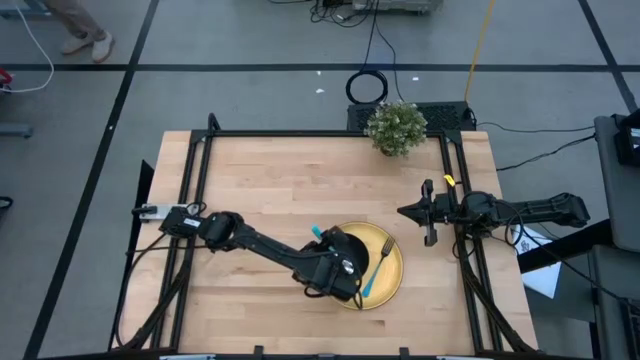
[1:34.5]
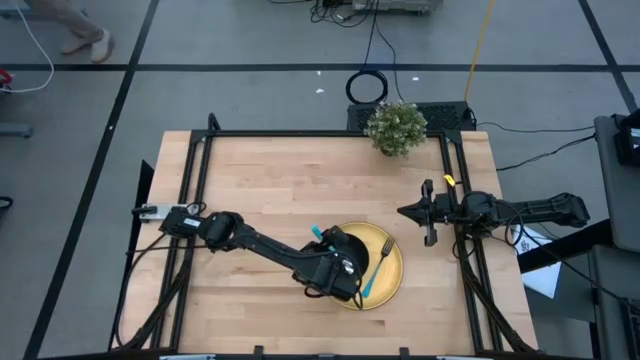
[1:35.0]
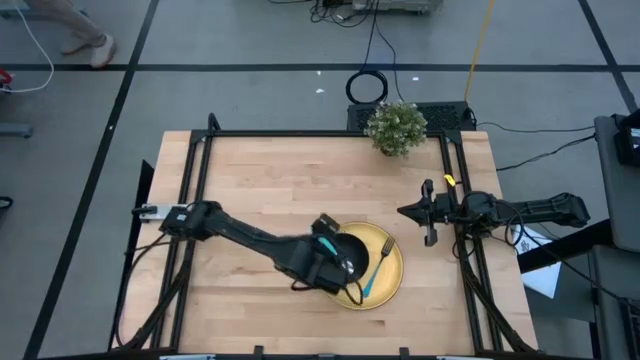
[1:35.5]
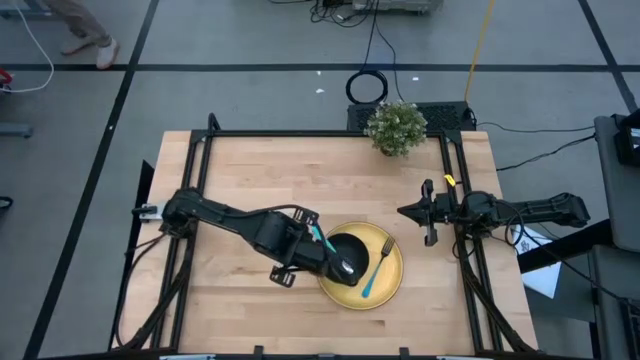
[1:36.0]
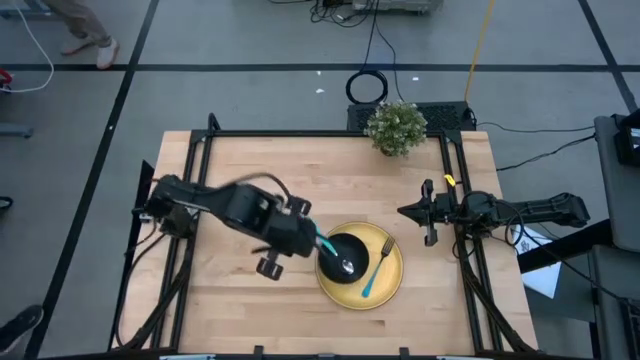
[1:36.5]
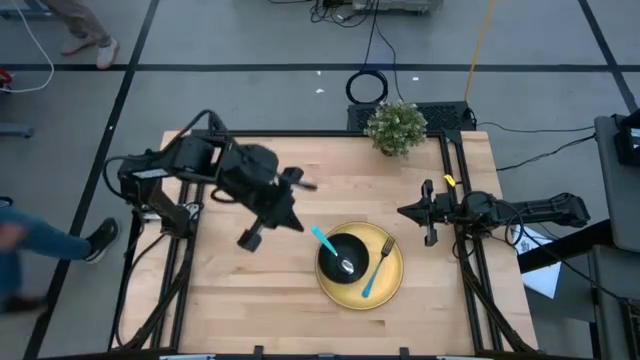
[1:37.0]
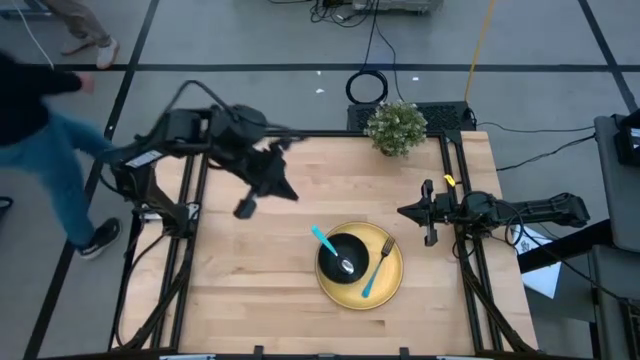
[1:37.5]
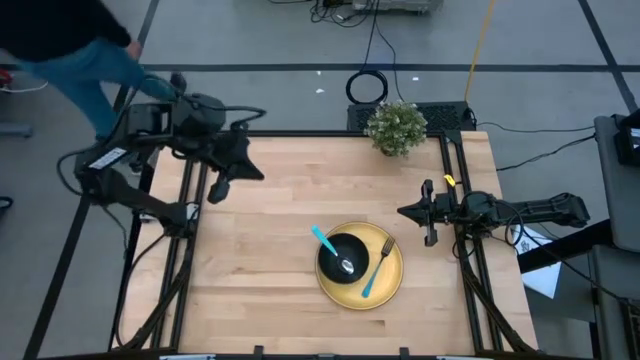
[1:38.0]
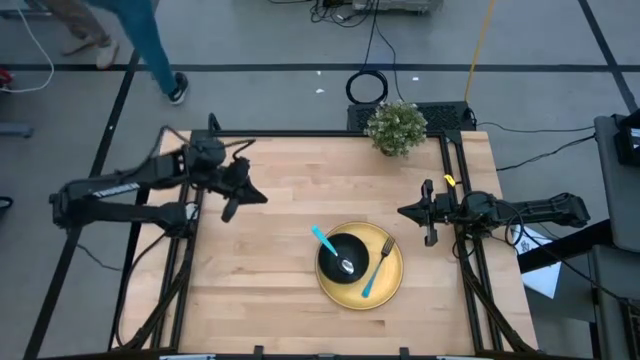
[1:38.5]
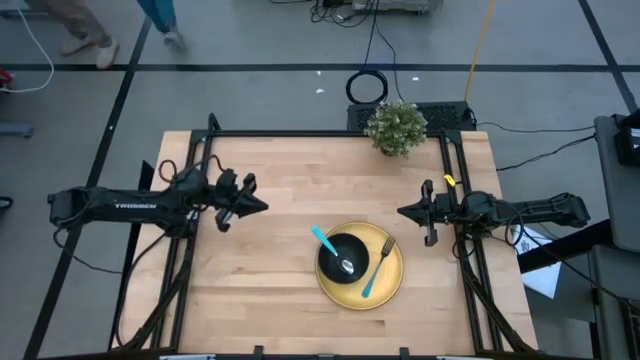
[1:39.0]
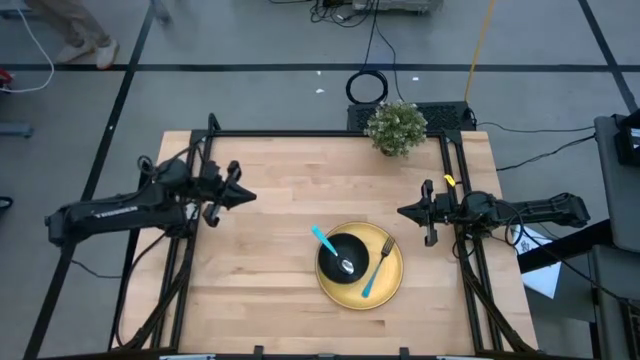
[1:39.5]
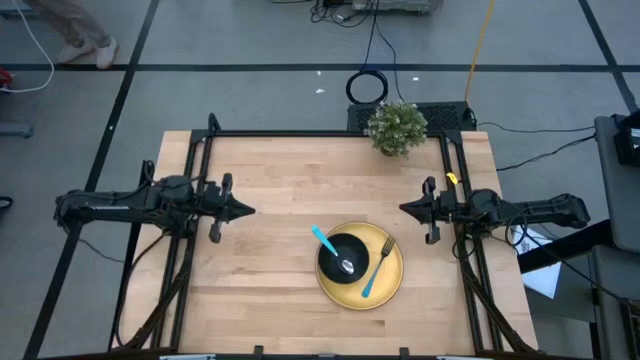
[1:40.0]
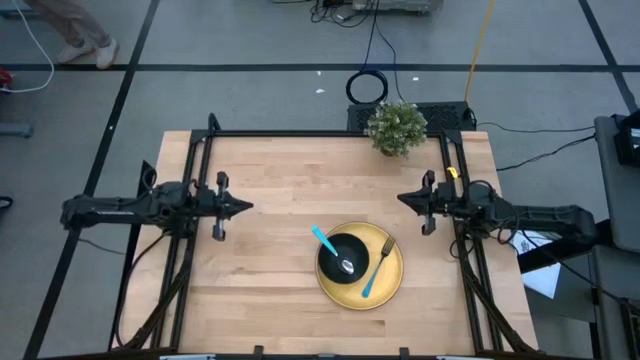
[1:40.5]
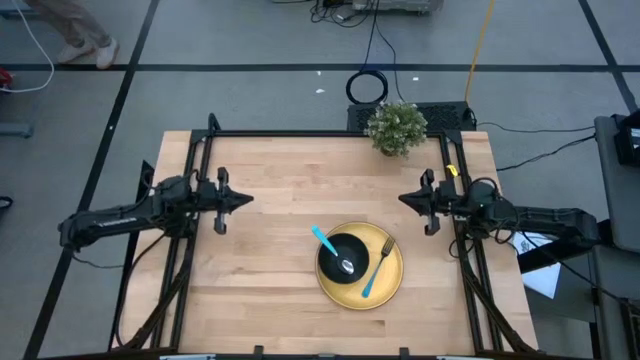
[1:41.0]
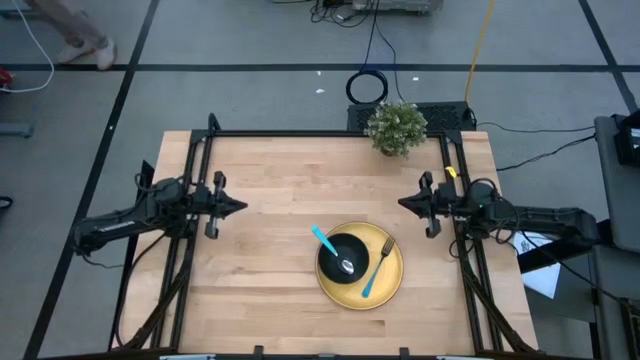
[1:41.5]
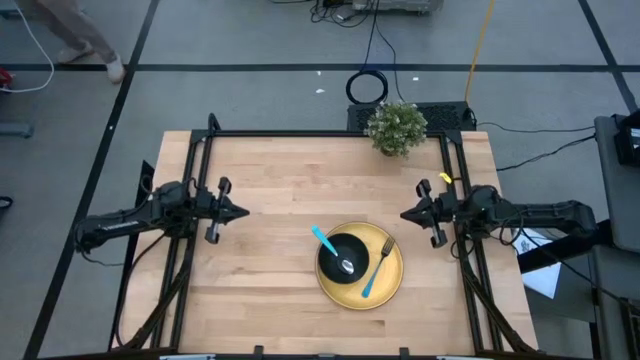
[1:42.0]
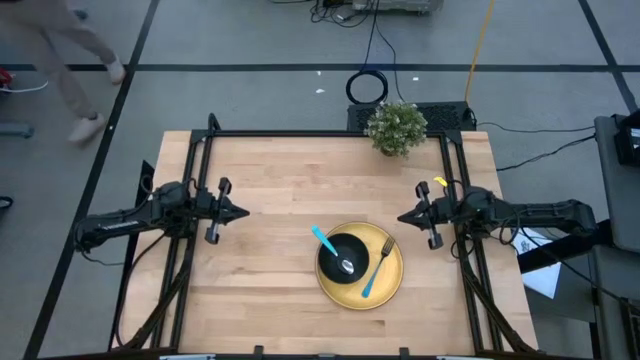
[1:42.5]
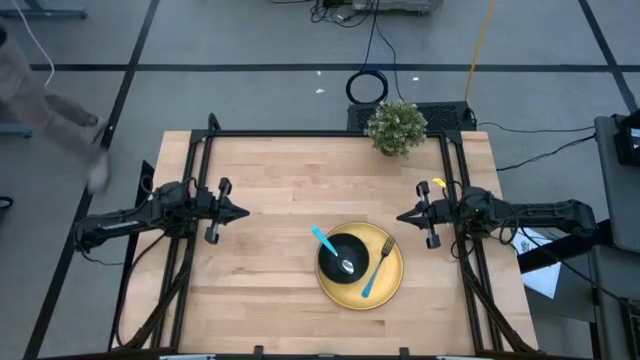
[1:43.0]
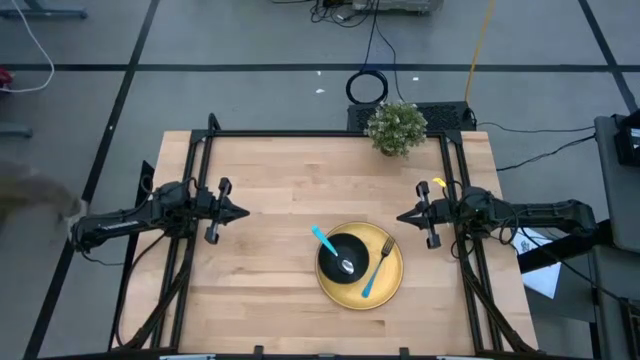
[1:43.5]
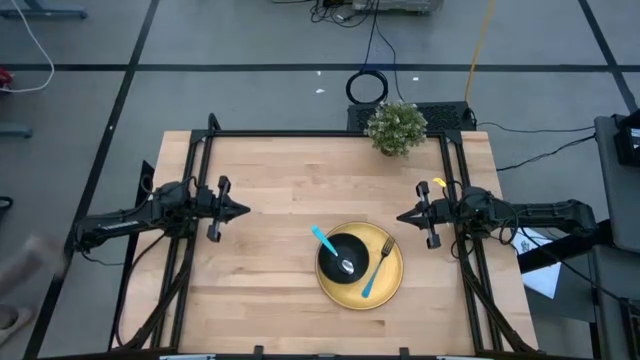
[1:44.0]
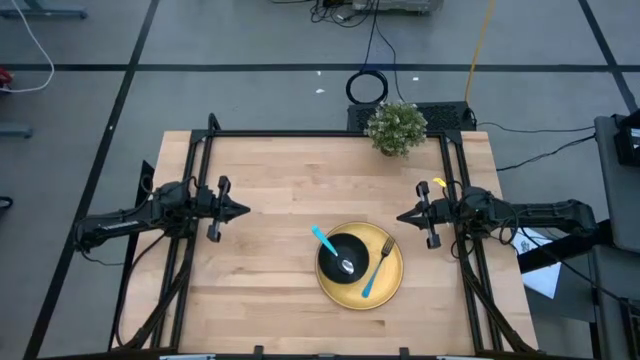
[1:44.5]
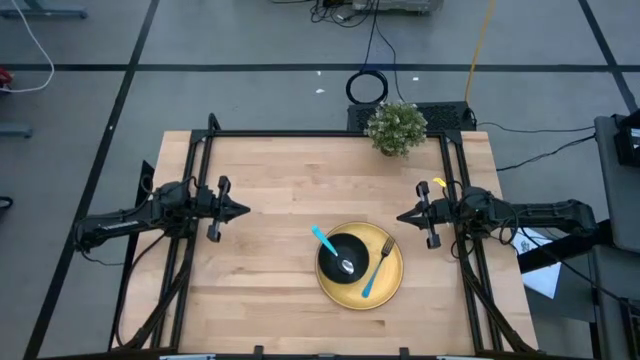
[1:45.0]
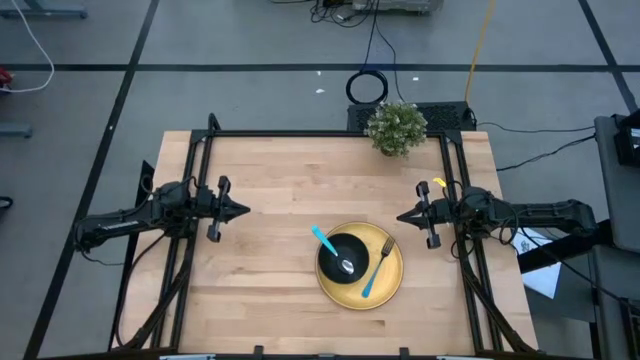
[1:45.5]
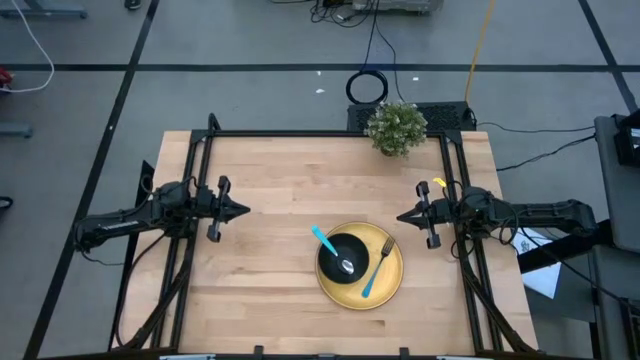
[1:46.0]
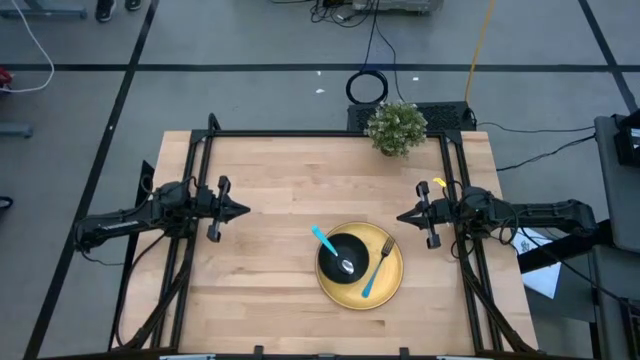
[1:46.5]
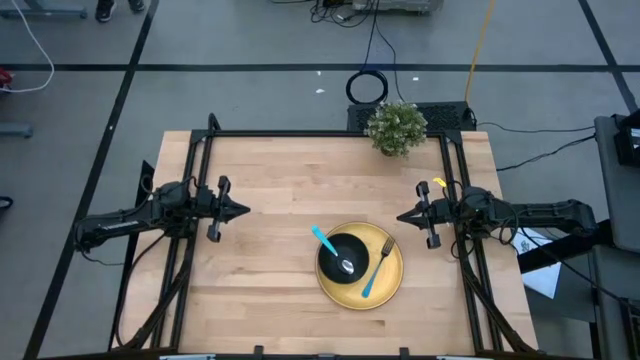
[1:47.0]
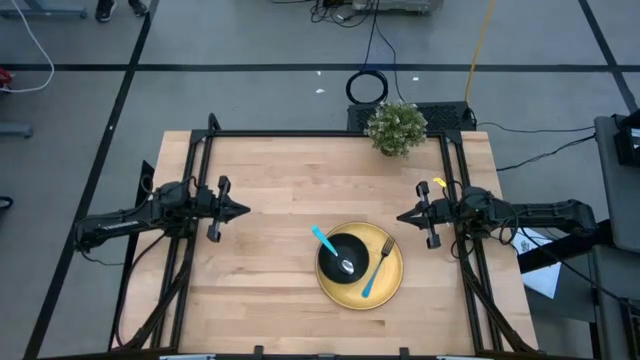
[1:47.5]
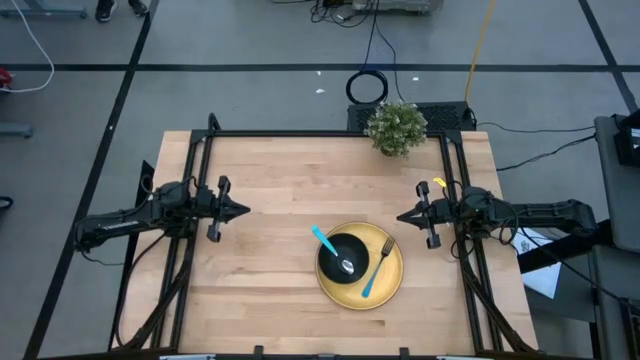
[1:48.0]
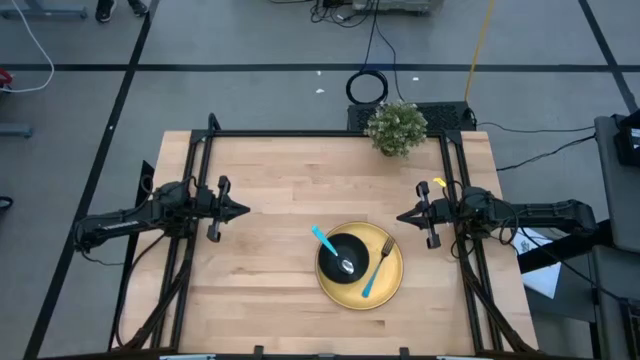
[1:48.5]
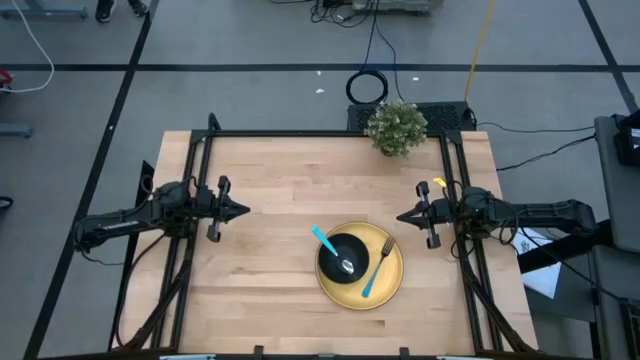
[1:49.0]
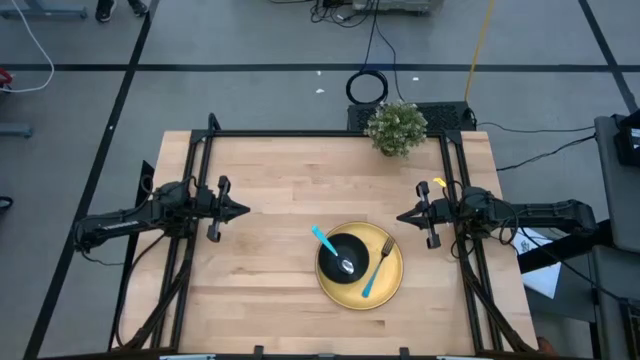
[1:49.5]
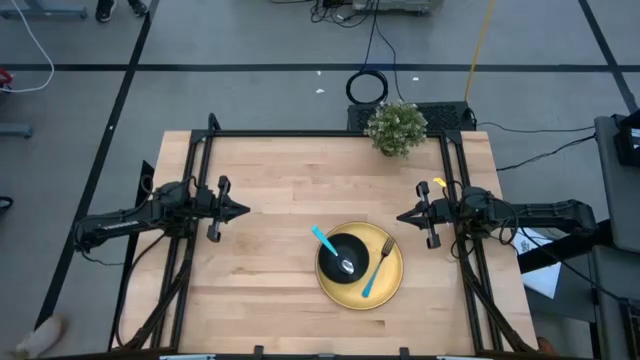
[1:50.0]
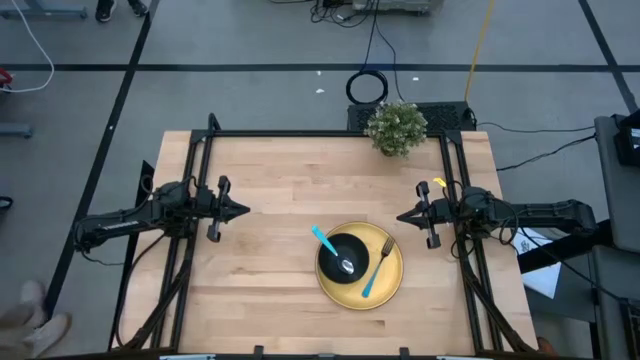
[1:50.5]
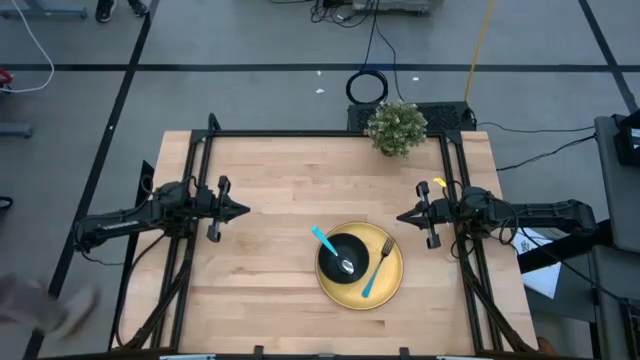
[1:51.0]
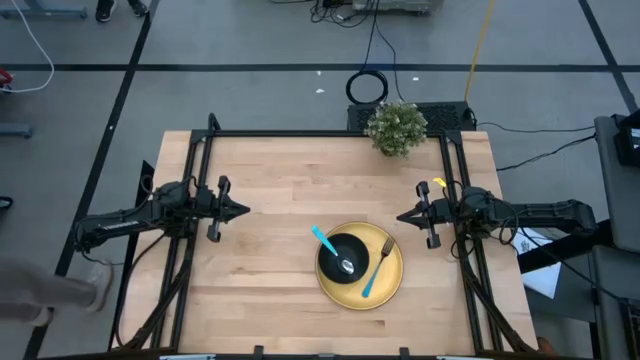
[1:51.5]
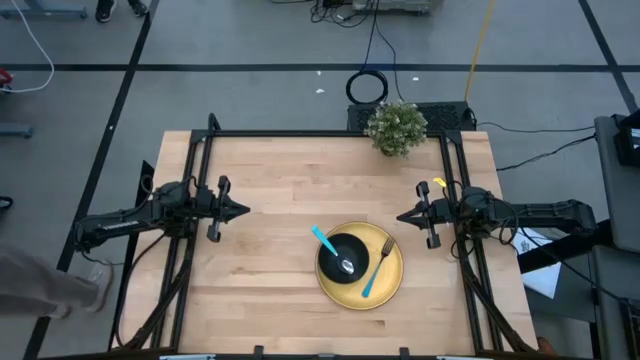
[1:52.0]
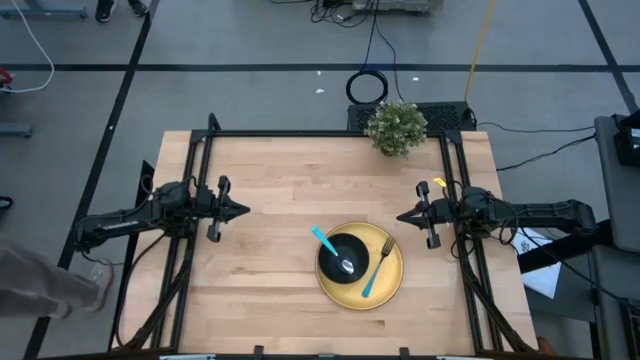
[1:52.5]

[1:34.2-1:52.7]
Task: Set table place
Return to Home Position

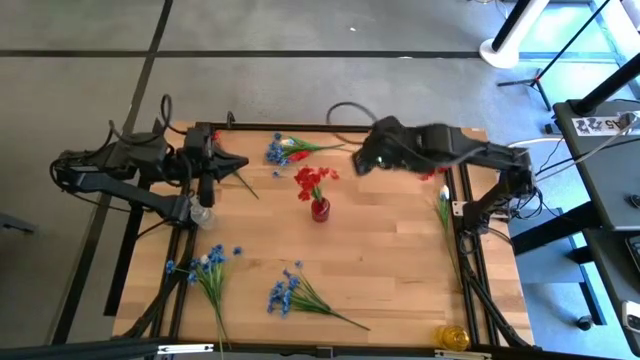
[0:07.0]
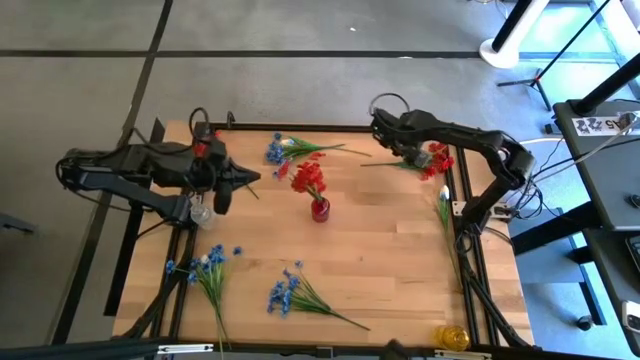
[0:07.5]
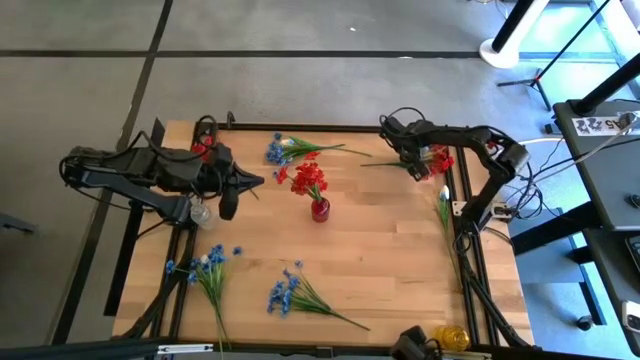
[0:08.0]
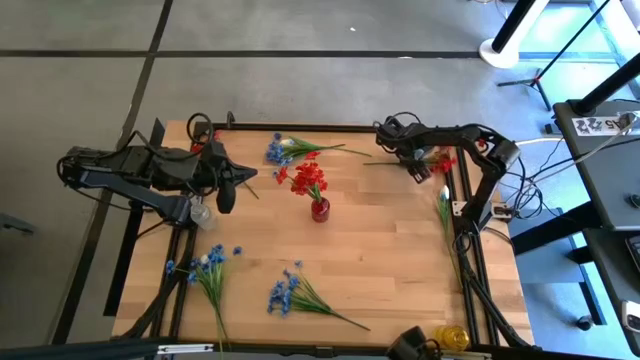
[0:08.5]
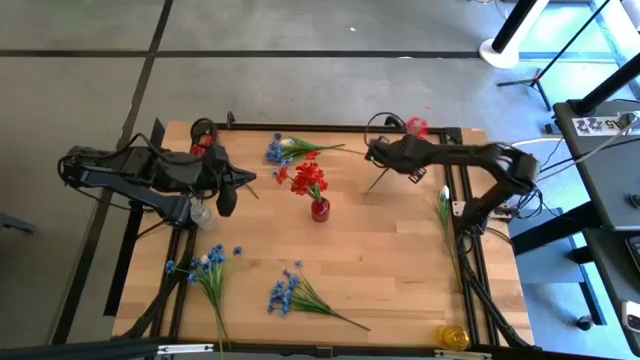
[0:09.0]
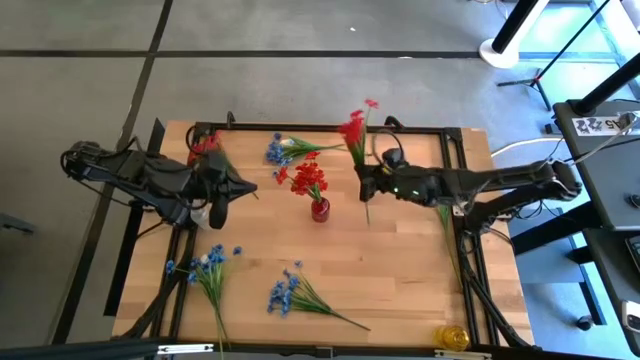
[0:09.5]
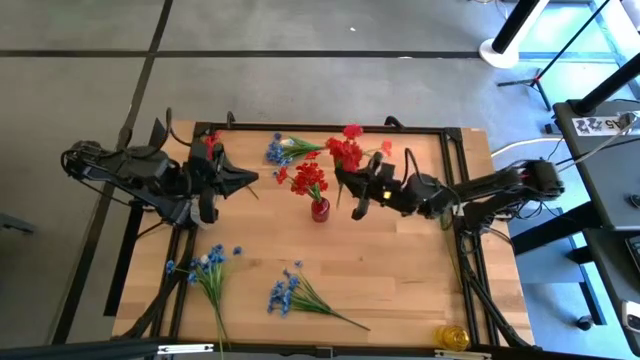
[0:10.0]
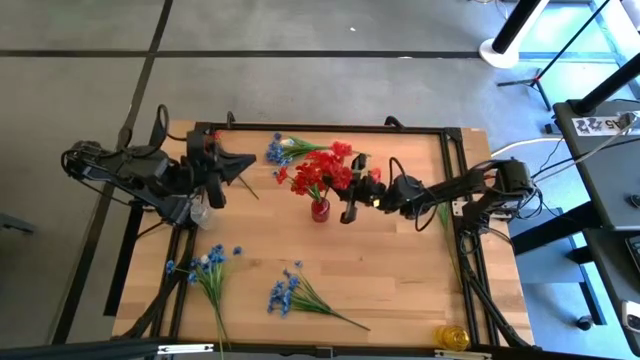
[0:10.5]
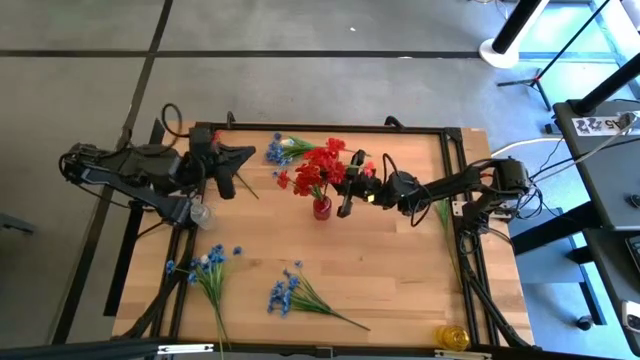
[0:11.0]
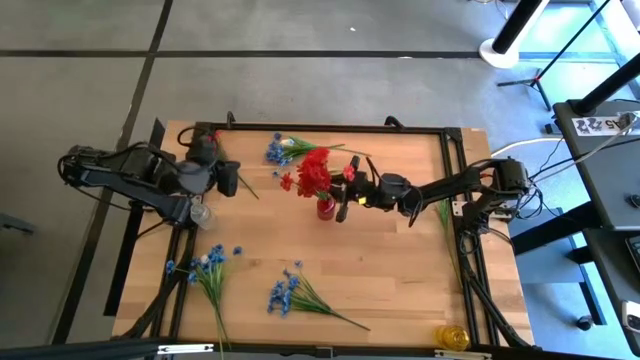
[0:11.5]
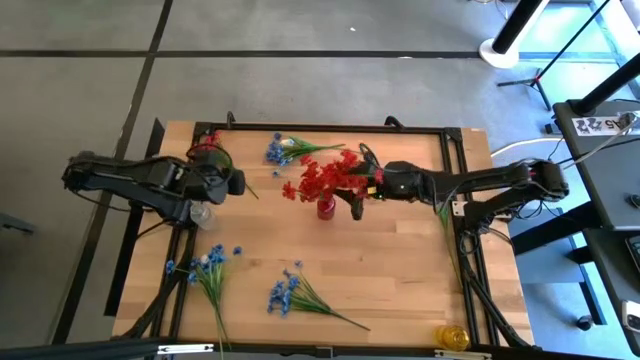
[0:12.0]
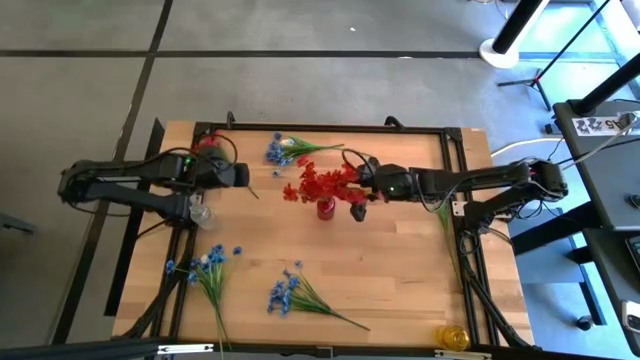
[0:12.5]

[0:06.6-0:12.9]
Task: Sort flowers into vase by color
Put the right red flowers into the red vase
